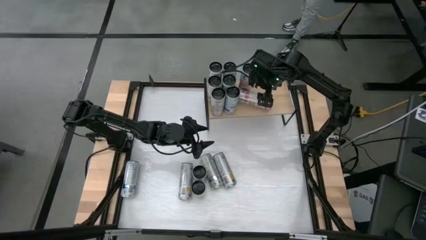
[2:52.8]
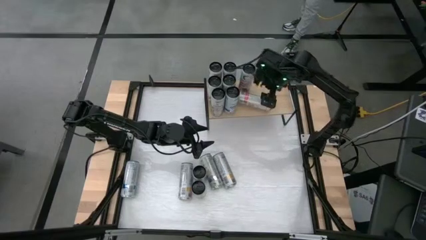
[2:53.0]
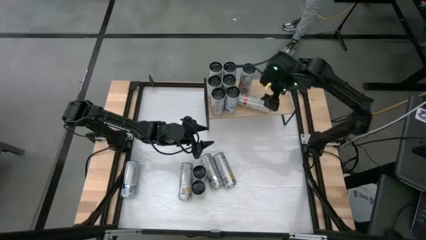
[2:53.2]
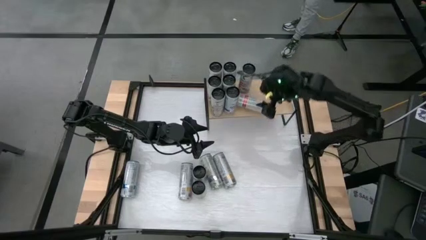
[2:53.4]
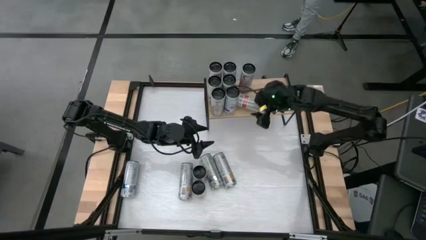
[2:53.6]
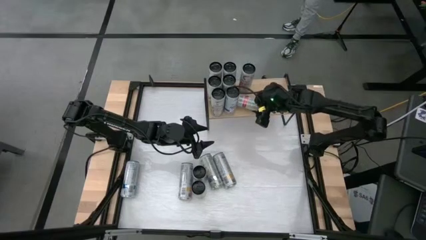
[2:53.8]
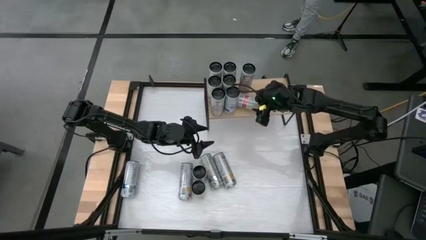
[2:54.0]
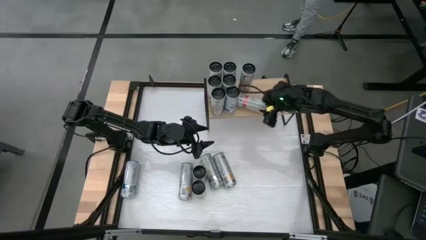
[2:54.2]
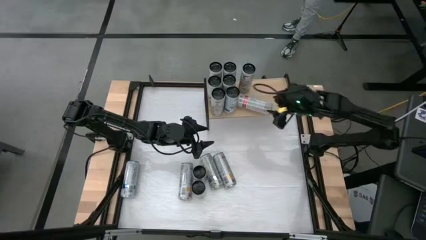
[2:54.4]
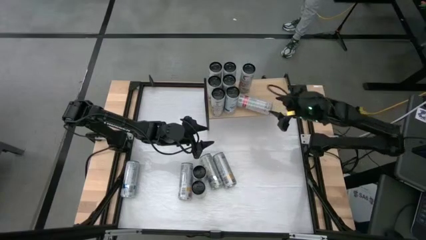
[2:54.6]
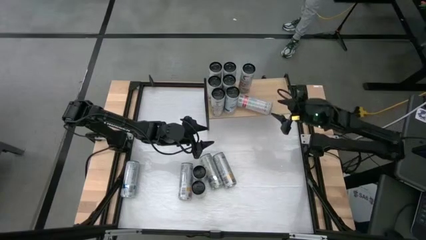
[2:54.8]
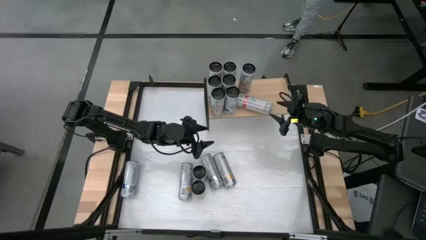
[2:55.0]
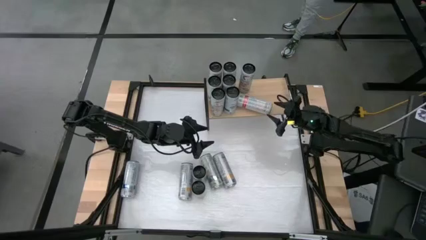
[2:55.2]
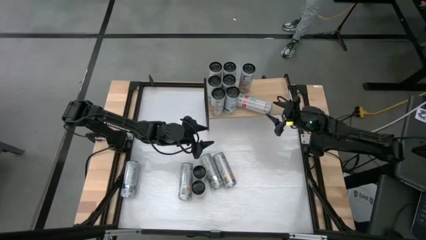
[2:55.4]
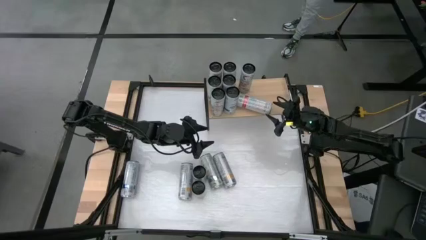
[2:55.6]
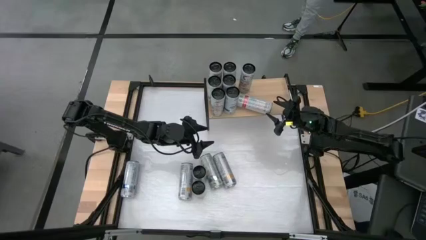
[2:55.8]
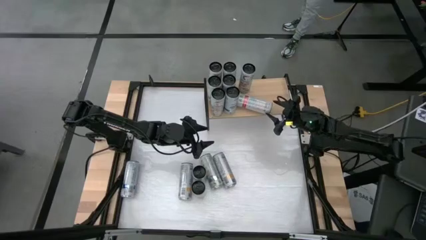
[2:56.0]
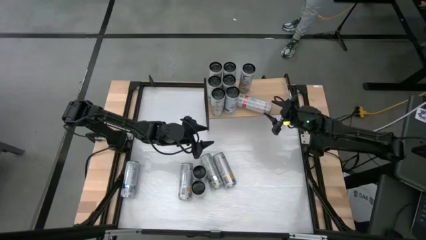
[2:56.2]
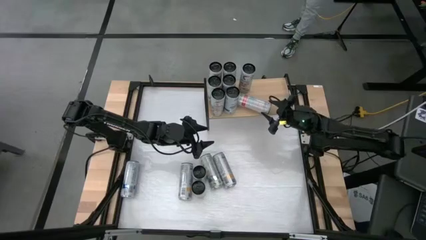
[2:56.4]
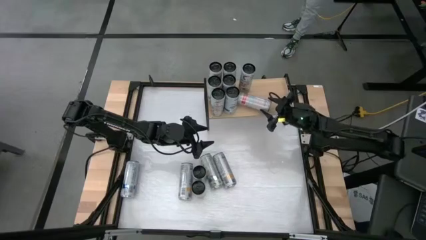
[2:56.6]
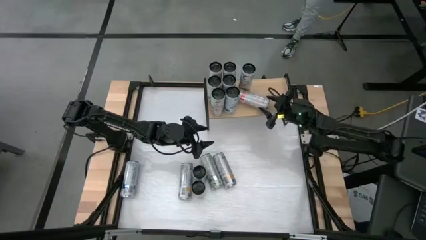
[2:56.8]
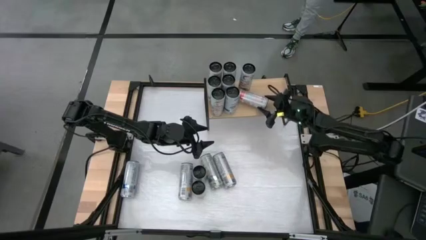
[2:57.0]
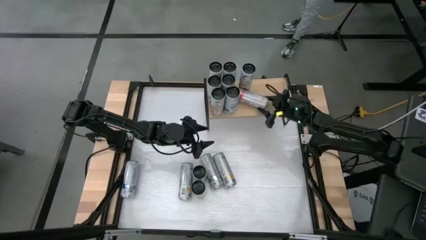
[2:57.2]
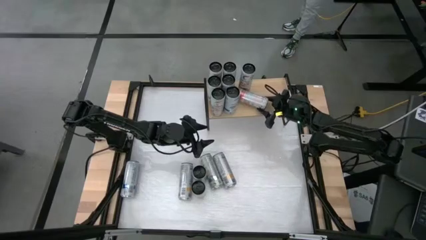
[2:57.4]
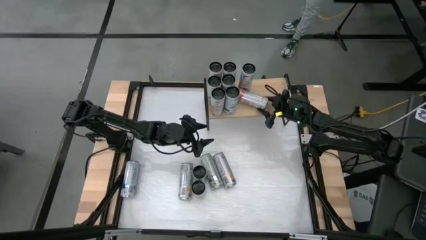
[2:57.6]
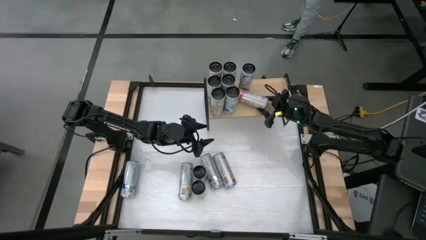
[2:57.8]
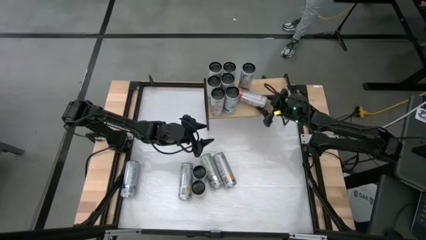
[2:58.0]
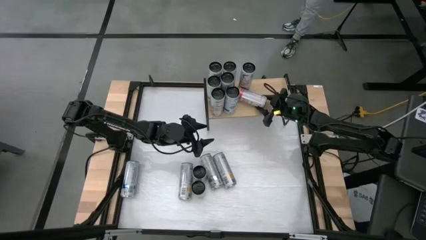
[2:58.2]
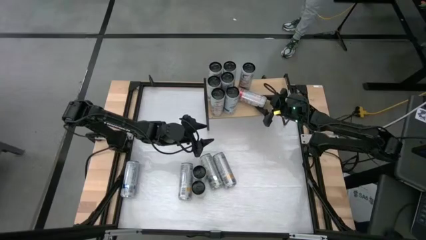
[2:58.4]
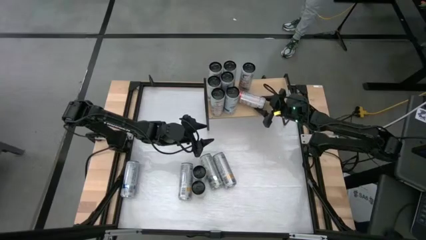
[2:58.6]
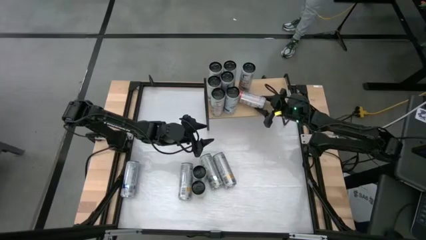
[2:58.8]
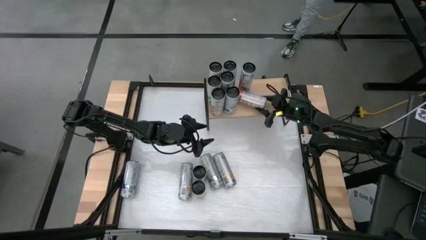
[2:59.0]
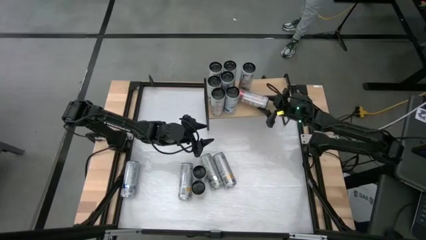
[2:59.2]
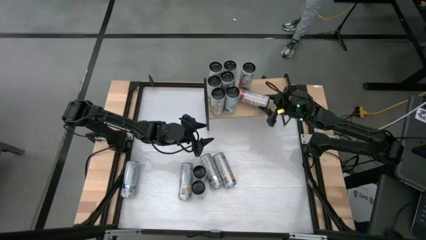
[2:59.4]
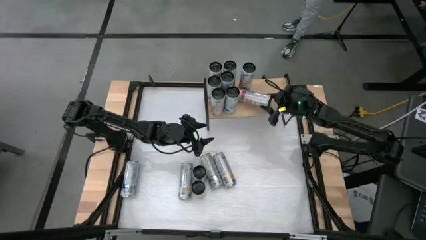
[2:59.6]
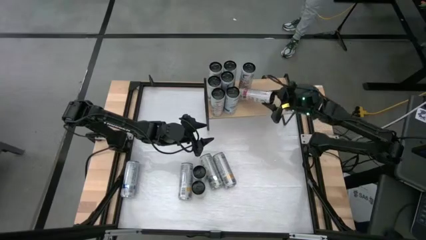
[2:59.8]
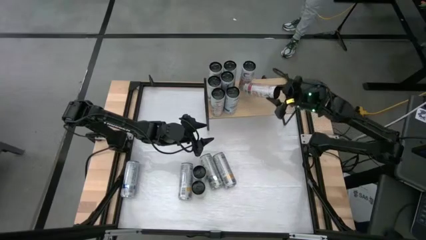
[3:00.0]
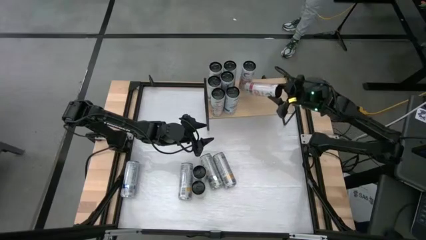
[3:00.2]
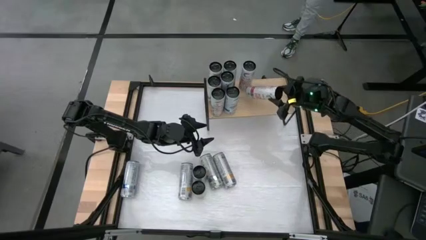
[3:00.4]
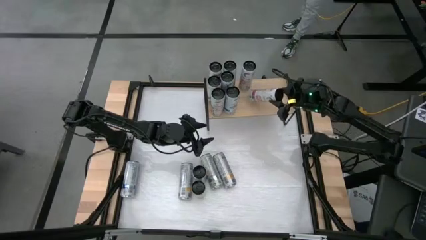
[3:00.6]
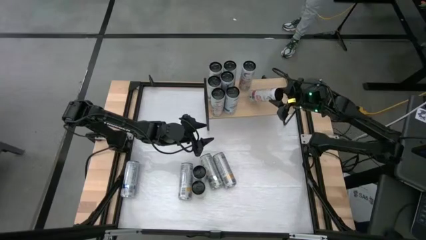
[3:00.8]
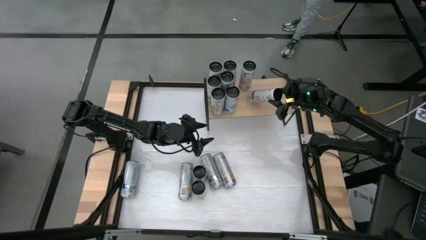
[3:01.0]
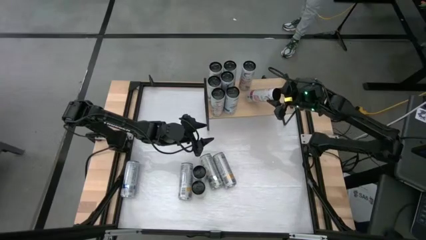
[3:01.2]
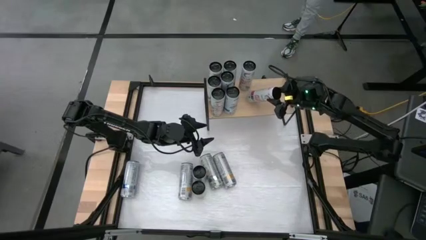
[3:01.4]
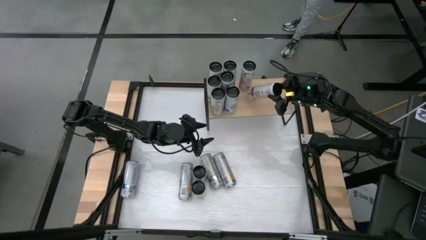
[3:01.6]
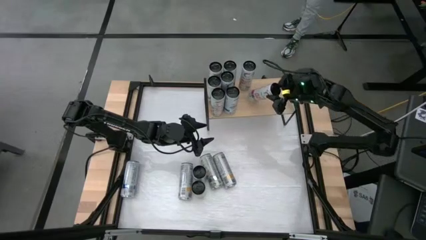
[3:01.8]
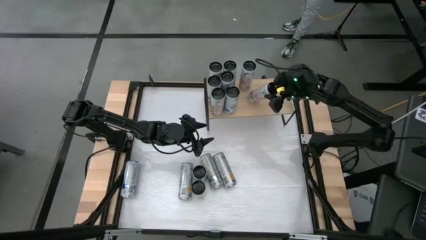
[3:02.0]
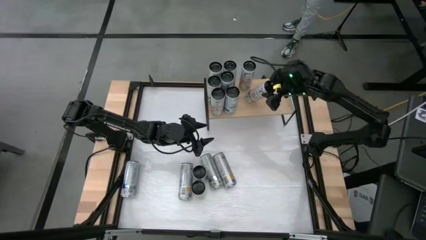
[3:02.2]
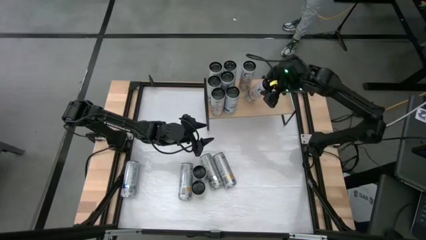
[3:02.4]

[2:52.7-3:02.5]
Task: Place canned beverage on shelf
Put the pink soda can on the shelf aligned with the other pink soda can

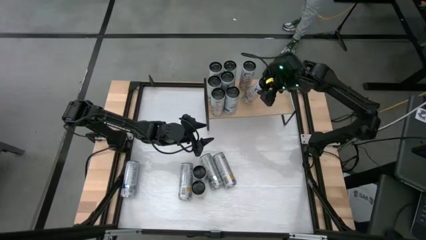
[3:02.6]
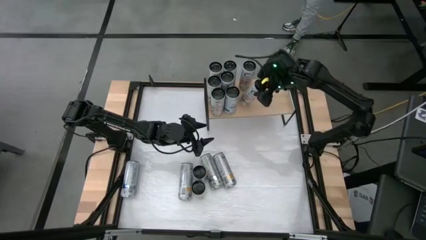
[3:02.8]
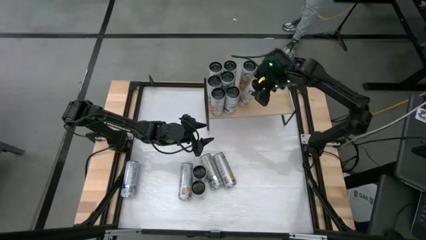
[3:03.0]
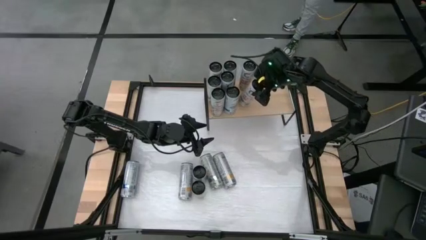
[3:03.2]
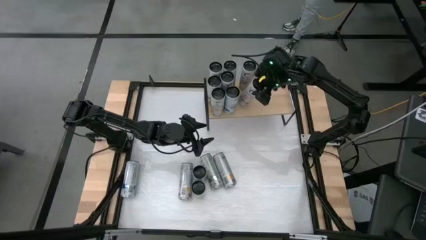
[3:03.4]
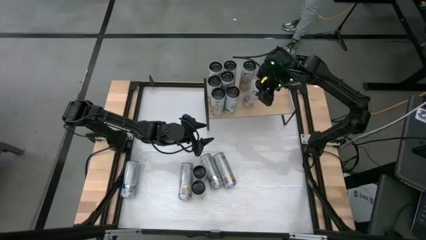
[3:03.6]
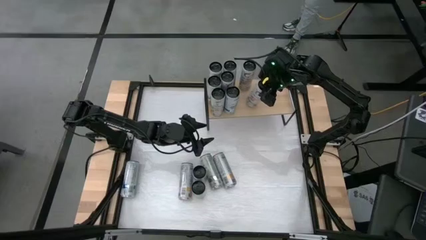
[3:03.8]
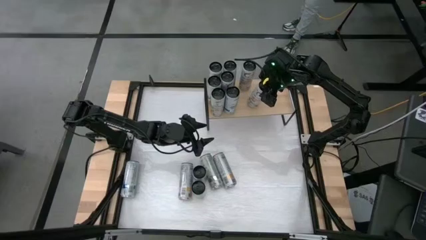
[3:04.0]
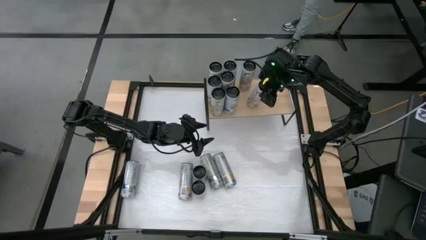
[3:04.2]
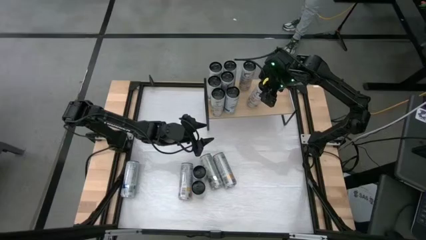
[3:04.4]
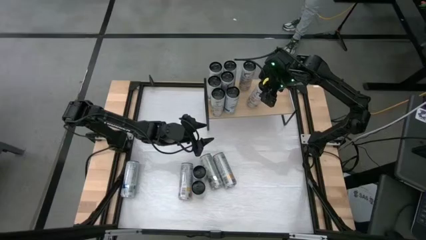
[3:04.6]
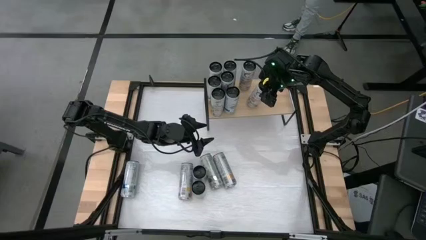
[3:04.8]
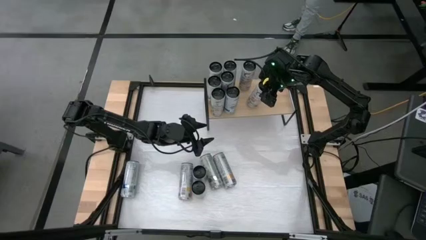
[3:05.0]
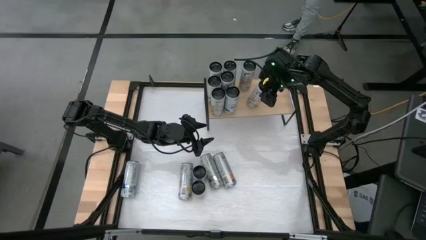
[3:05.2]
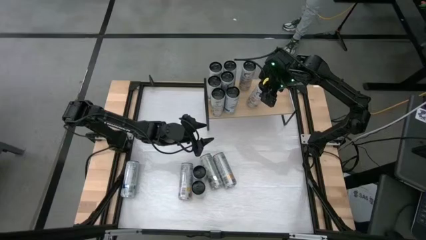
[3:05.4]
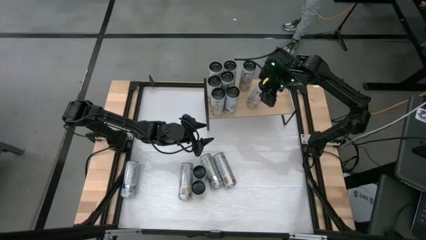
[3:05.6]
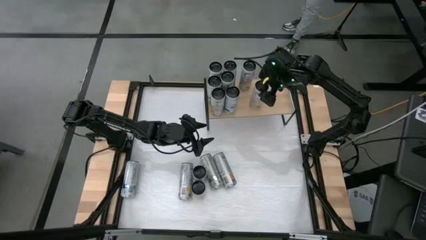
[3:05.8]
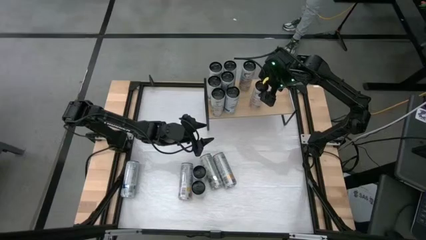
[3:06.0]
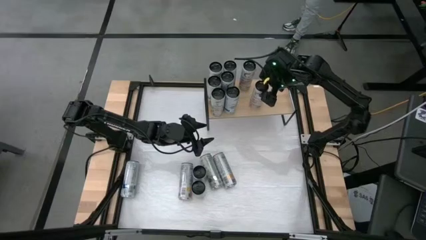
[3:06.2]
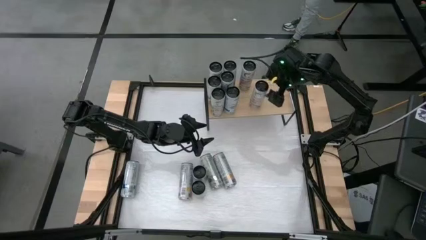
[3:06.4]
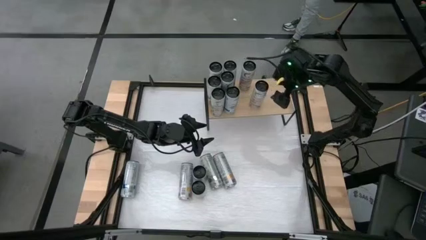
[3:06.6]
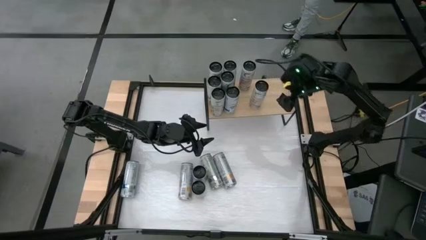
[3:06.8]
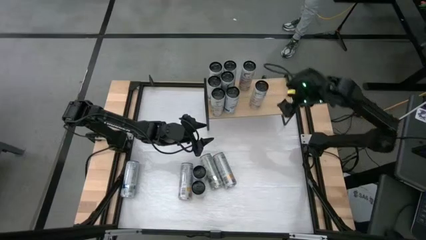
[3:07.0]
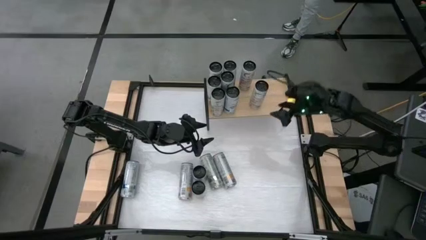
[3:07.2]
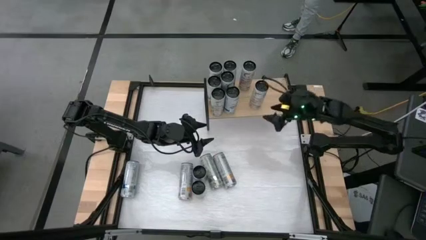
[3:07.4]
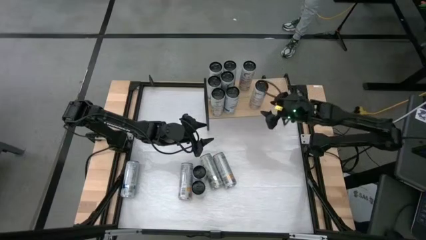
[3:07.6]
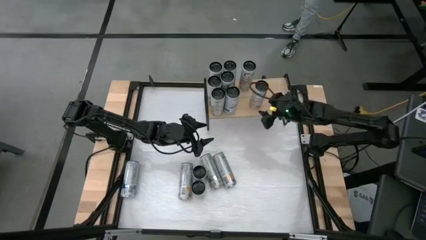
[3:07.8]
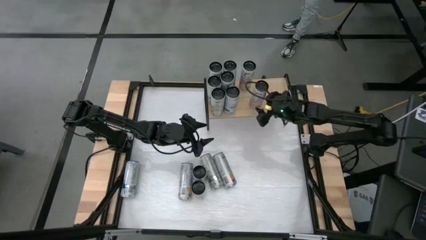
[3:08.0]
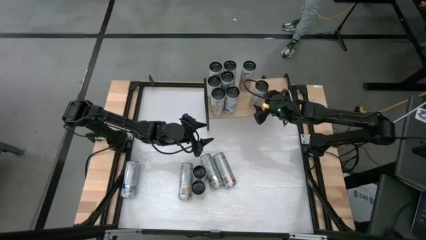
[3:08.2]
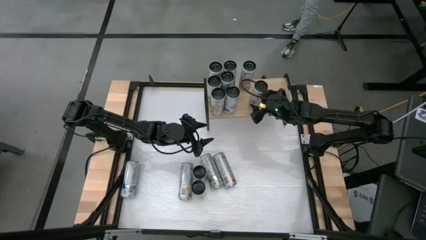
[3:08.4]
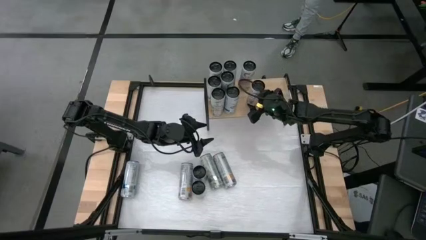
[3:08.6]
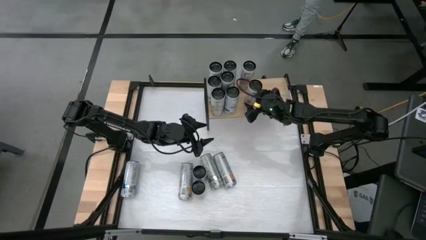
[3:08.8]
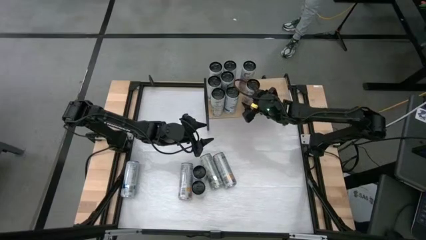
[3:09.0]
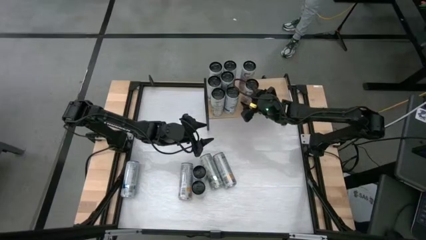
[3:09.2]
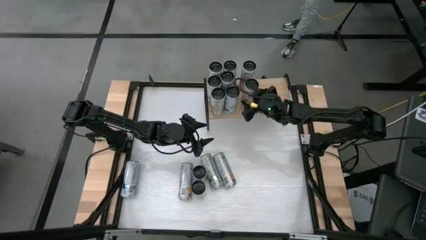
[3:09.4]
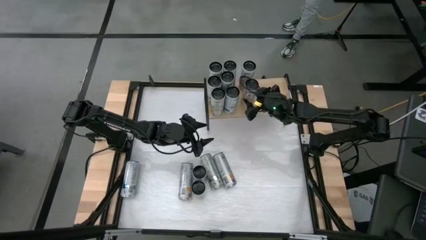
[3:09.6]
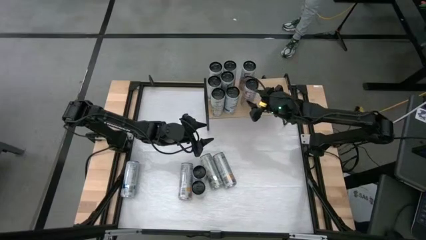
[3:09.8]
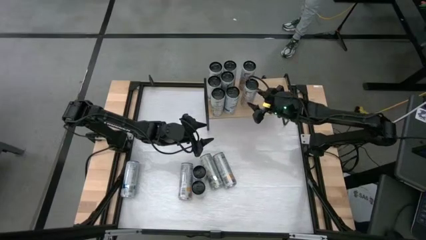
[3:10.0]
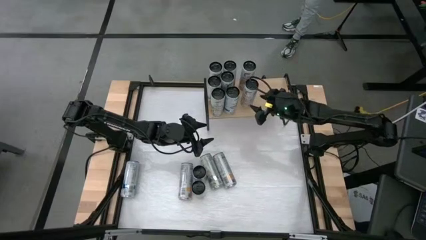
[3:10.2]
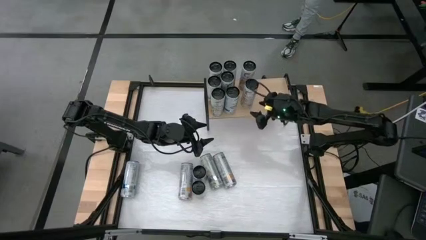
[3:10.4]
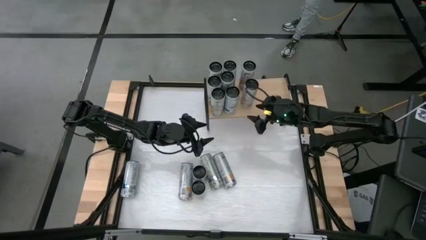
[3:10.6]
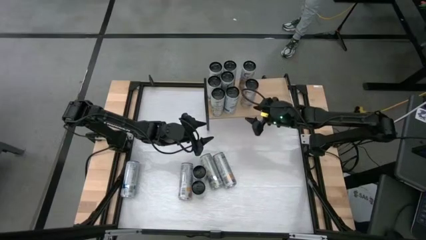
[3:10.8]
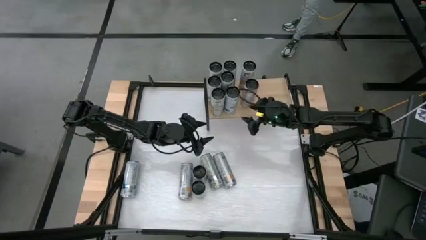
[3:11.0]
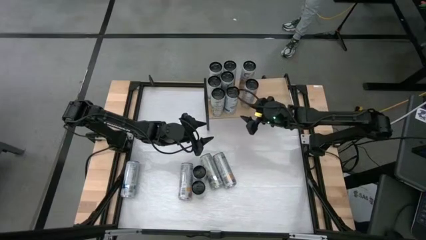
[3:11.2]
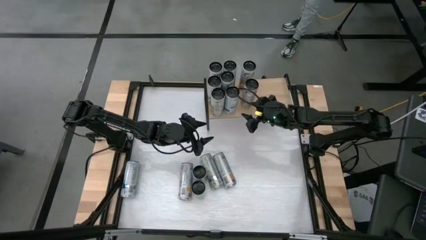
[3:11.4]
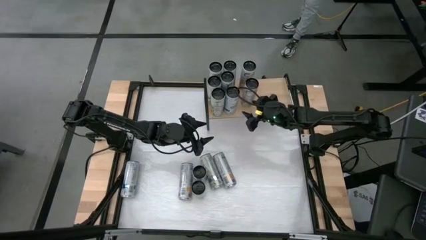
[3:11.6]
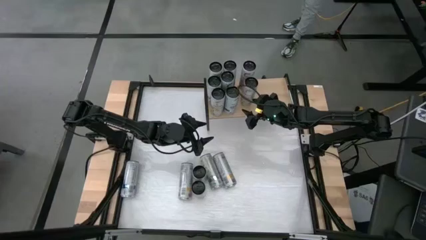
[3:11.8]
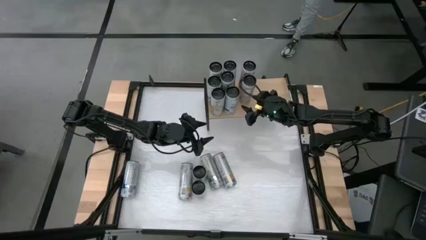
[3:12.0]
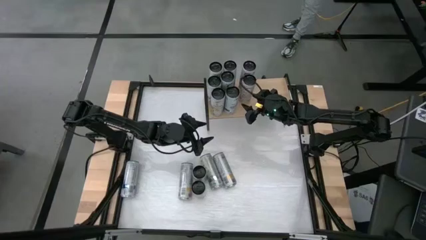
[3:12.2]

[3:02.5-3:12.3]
Put the pink soda can on the shelf aligned with the other pink soda can
